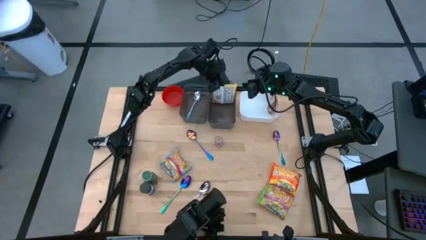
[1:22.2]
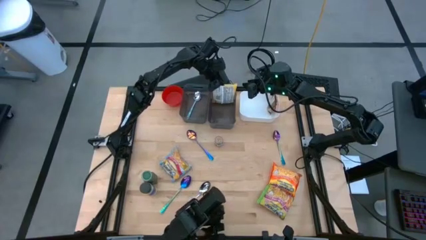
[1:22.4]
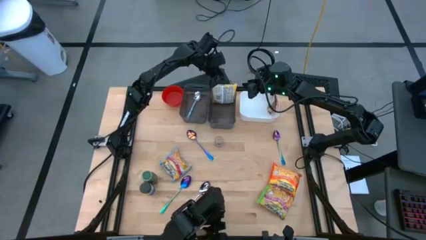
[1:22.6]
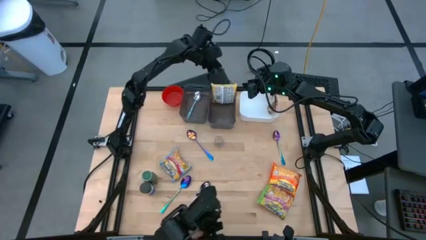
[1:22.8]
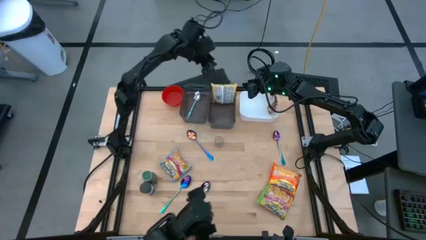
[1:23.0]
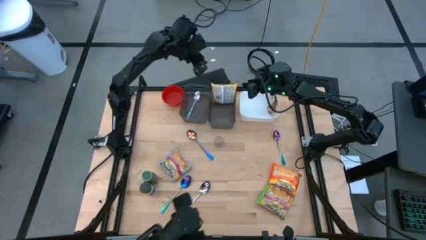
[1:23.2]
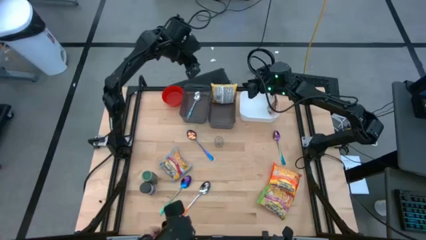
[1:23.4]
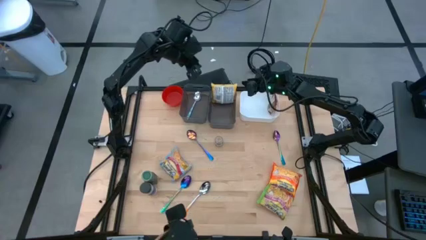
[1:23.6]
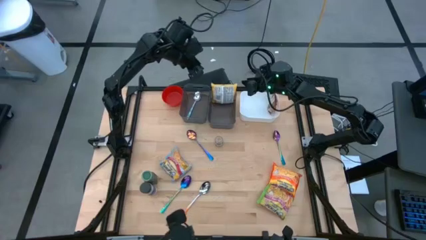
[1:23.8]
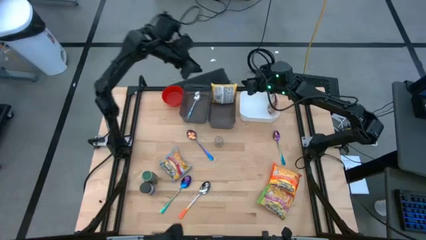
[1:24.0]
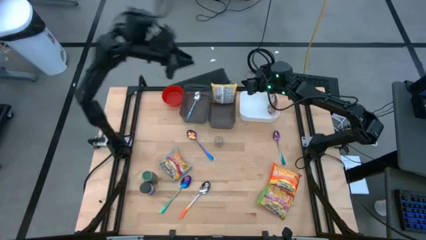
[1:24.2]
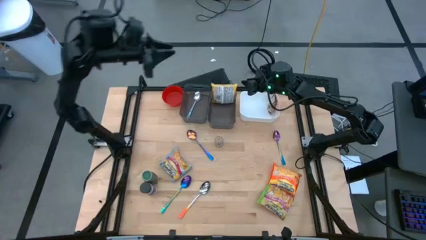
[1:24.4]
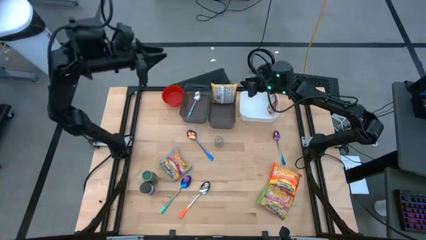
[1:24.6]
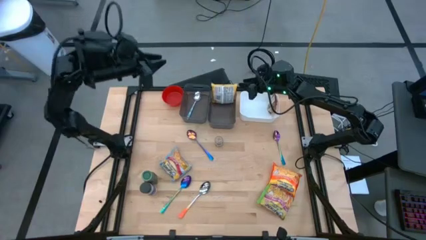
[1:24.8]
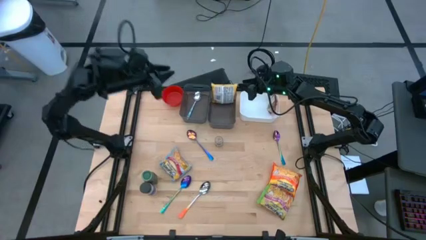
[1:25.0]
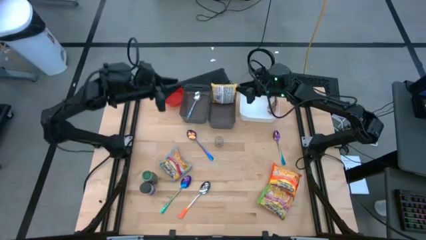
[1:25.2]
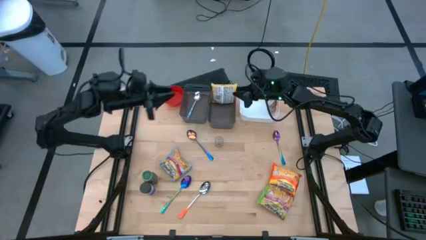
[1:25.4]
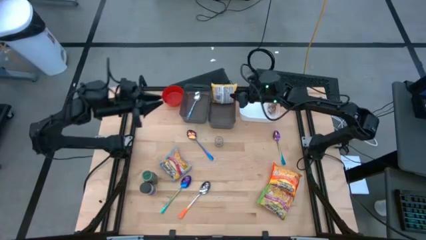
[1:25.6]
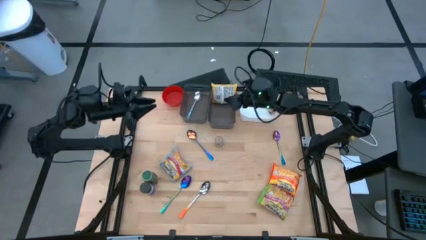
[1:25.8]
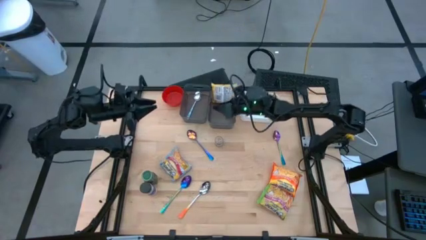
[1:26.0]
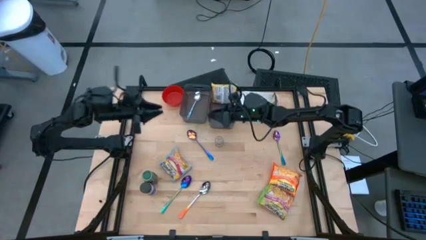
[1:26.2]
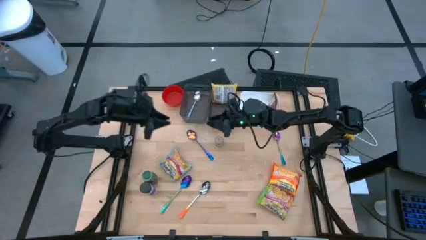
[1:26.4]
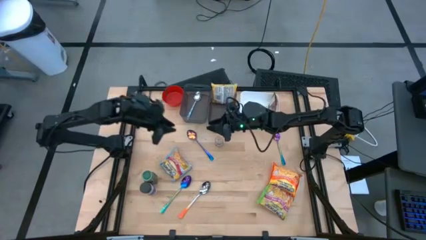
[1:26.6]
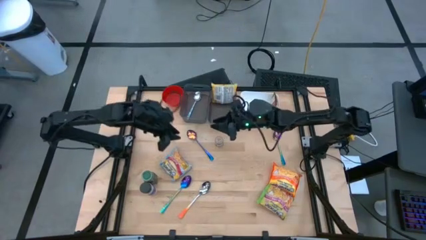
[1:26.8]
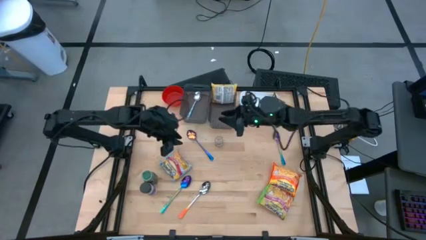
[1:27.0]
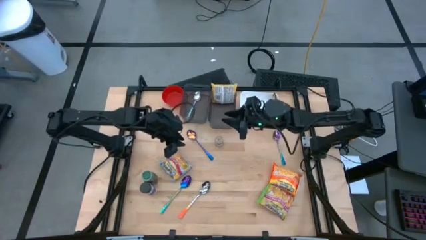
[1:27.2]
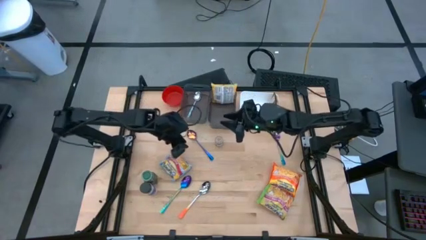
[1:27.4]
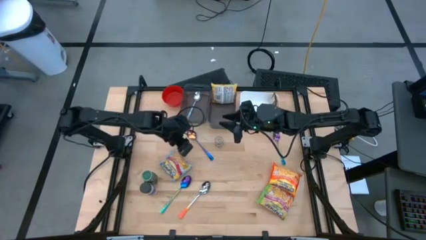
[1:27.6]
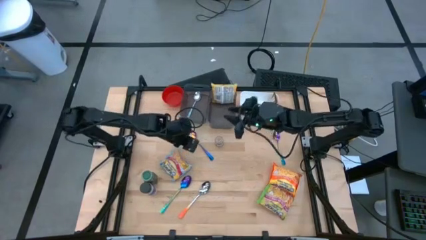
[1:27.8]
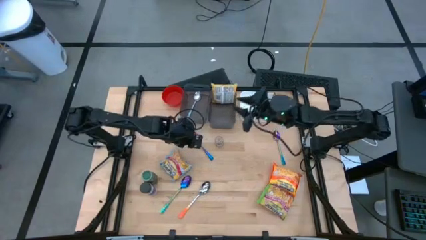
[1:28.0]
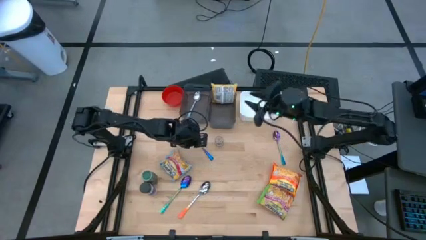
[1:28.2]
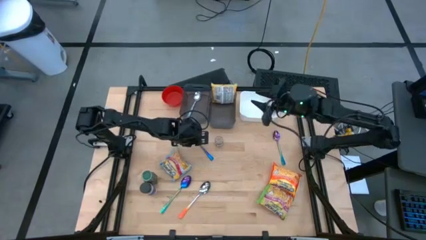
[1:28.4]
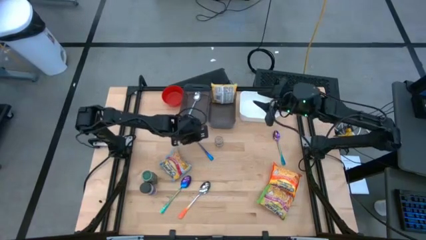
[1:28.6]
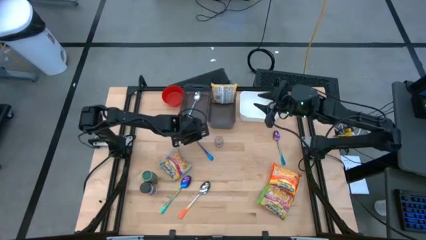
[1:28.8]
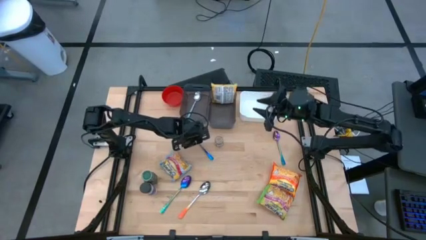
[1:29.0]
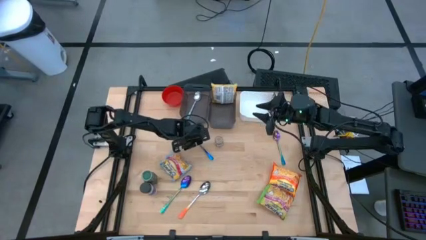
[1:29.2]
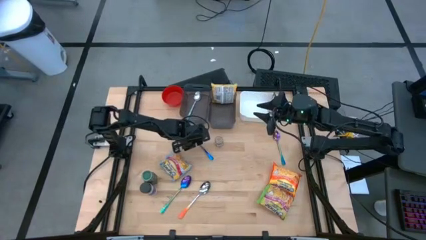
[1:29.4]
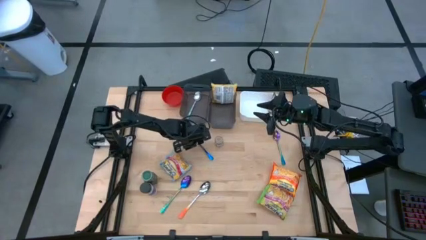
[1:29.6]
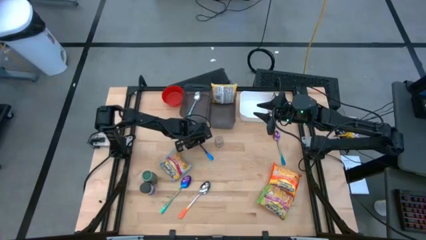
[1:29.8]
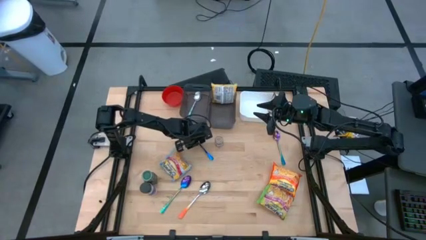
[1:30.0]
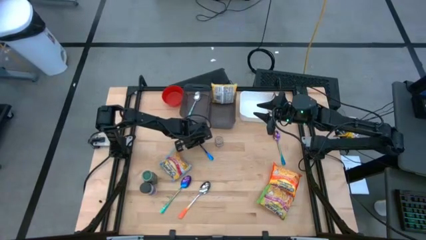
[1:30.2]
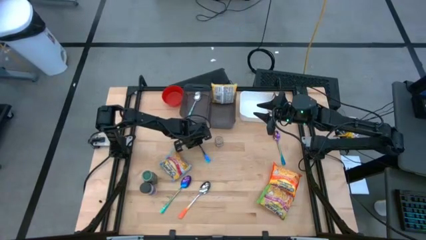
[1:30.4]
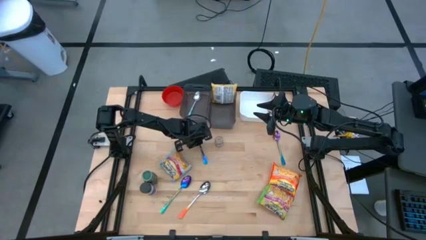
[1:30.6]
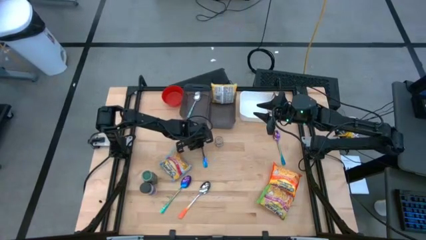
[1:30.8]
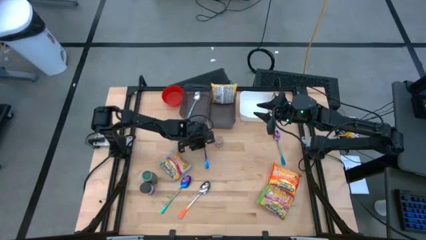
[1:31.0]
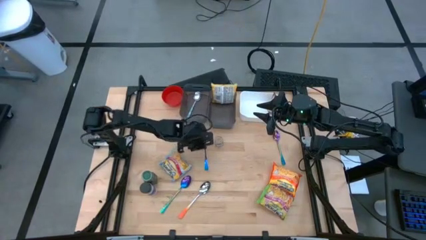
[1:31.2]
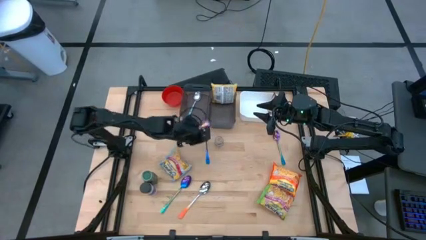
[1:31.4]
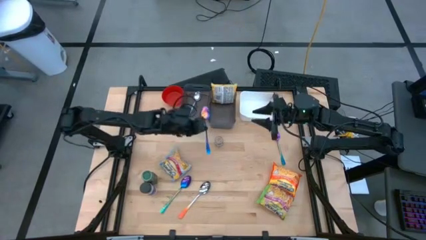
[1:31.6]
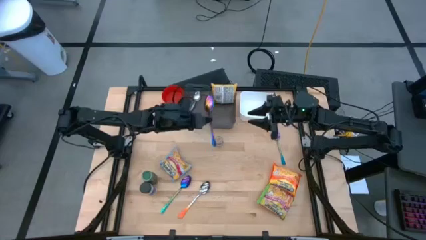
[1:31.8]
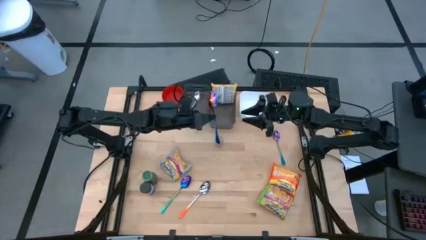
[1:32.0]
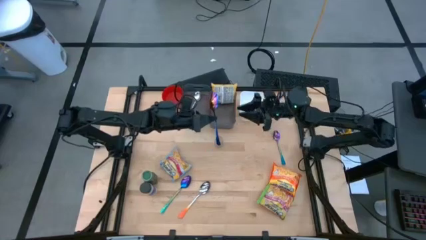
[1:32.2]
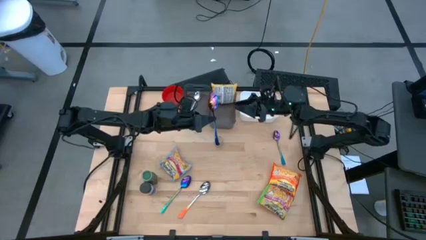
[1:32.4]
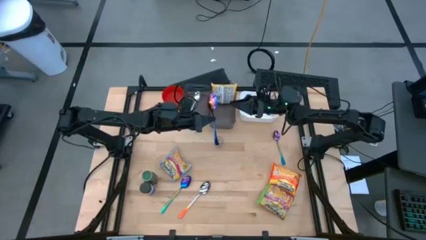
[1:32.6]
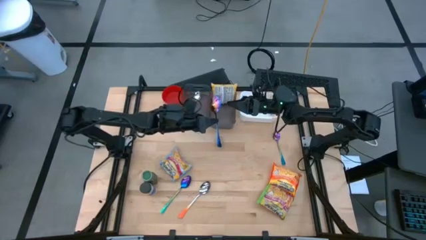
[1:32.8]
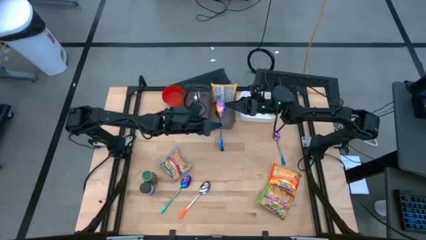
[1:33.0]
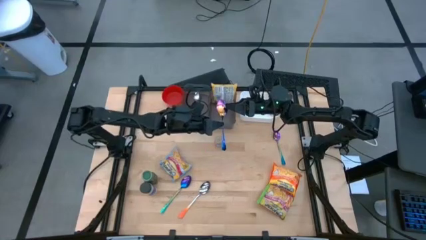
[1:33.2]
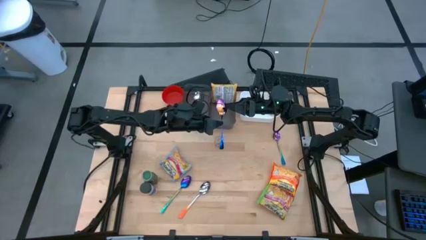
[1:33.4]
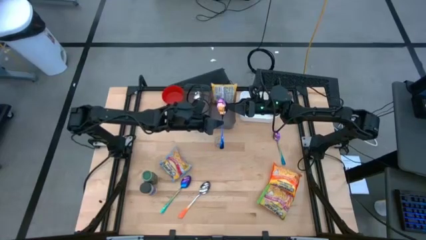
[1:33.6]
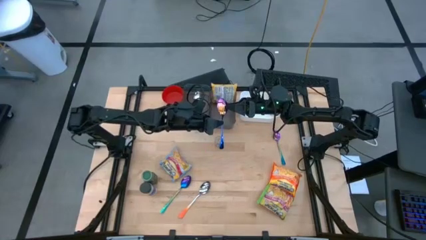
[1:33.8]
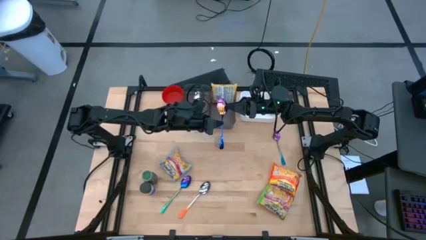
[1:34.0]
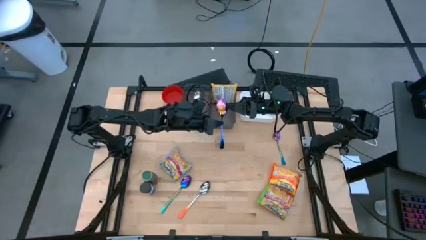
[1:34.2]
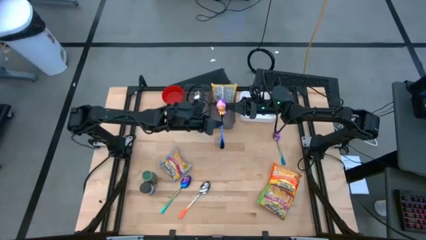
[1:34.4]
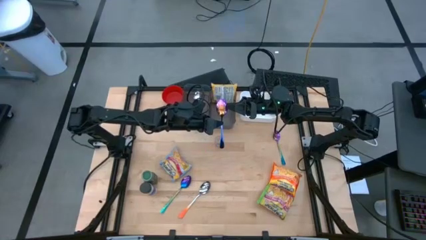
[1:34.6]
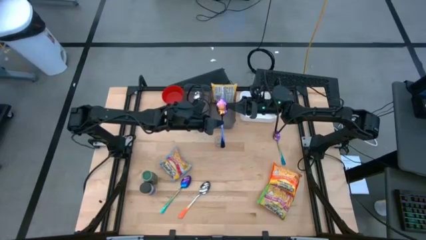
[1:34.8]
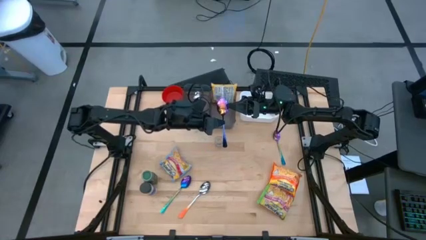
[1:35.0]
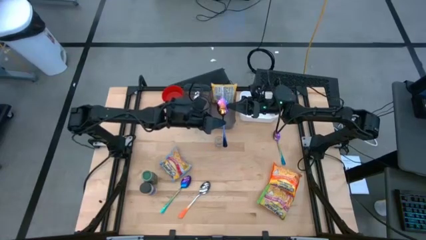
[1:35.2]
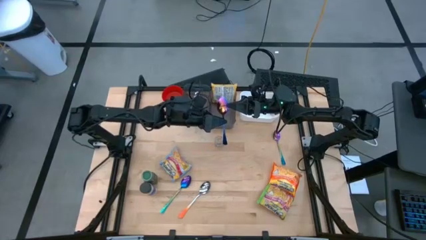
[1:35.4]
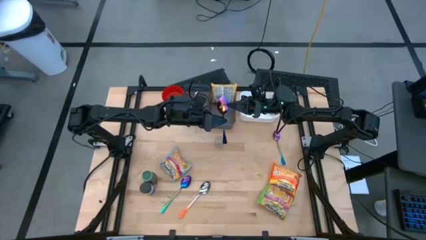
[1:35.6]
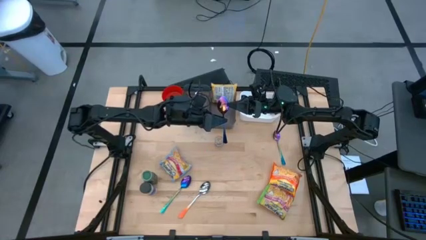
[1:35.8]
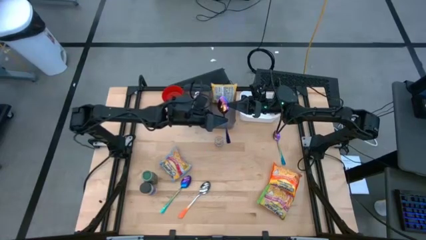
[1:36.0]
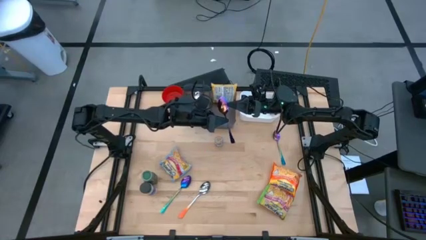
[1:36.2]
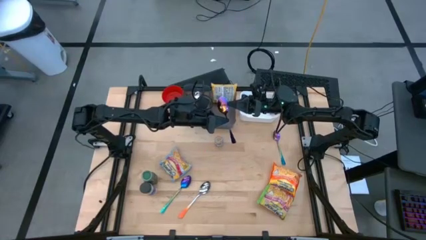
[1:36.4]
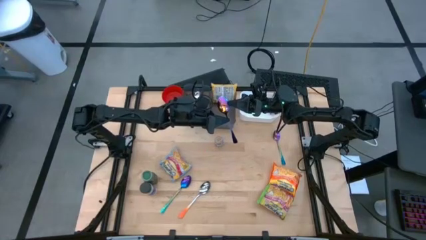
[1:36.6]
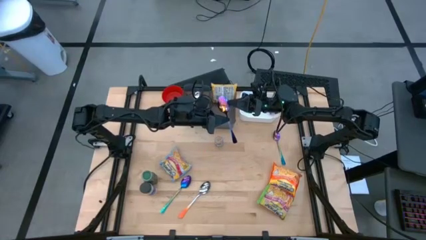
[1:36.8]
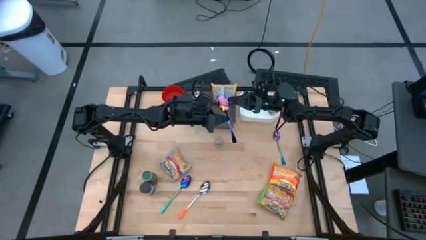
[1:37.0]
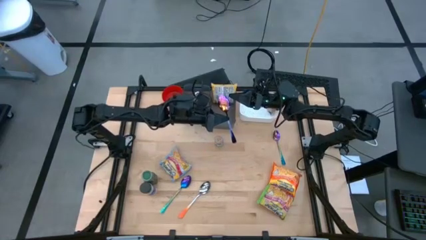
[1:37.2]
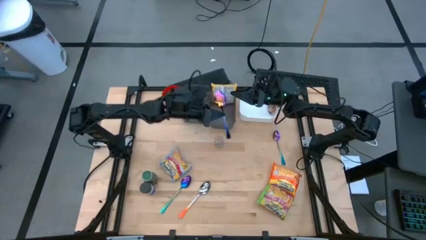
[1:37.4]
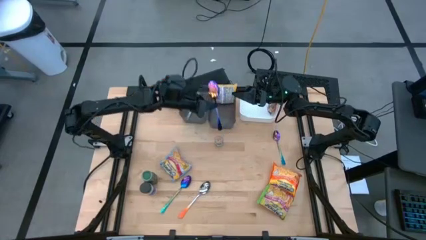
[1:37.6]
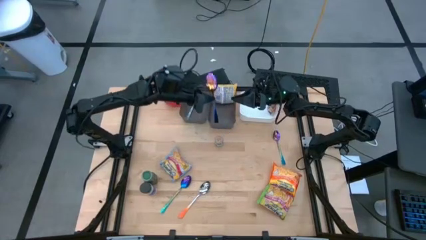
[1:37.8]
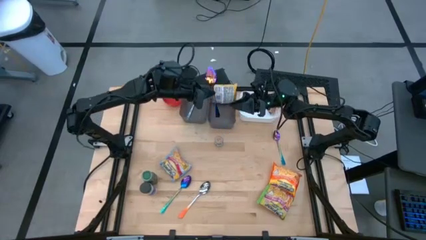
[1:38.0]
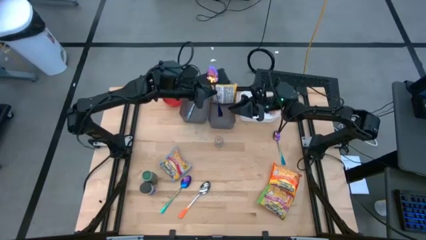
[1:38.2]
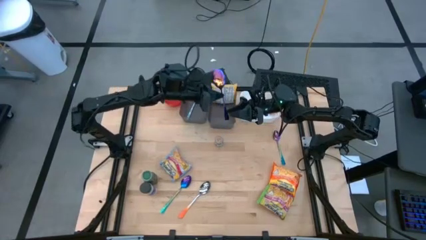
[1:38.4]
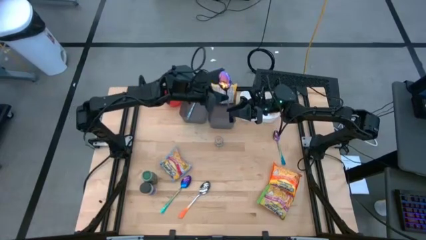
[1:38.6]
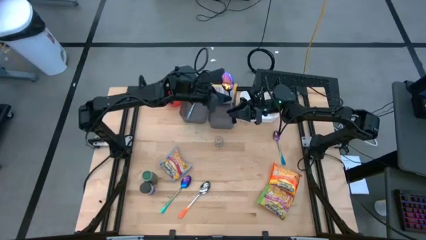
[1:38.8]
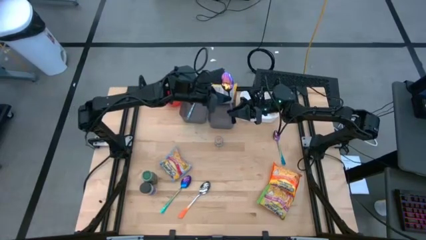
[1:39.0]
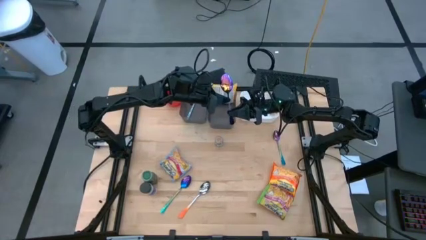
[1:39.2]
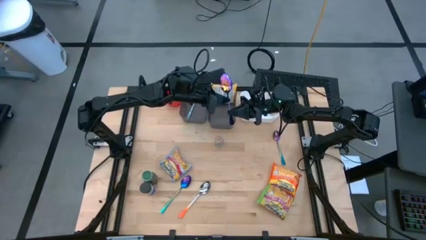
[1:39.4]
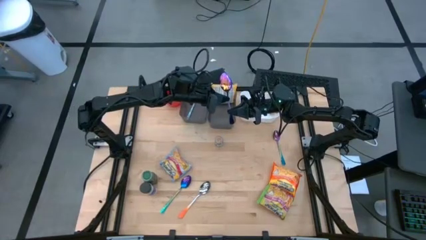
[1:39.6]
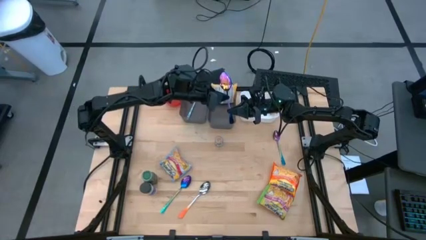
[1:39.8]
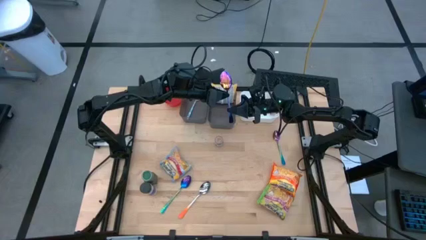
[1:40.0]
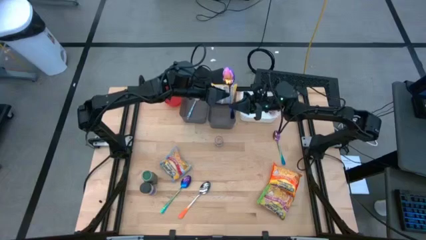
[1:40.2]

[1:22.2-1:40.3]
Task: Pick & Place Food Item
Put the top left purple and blue spoon into the left black bin
